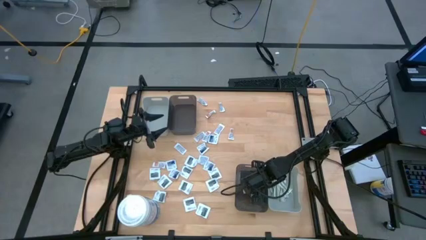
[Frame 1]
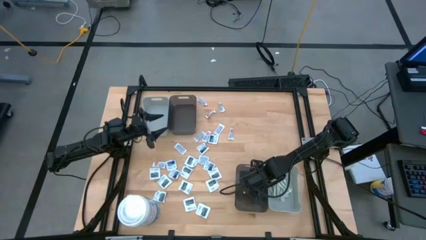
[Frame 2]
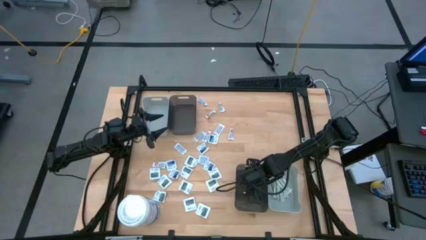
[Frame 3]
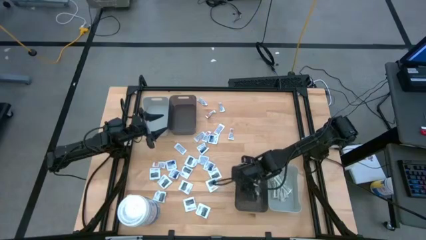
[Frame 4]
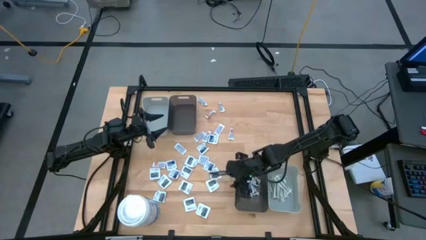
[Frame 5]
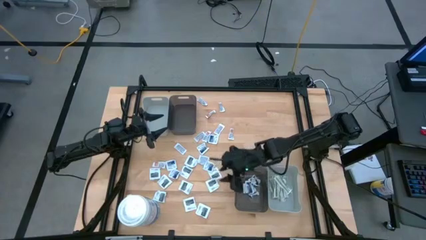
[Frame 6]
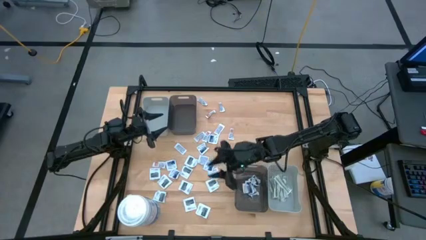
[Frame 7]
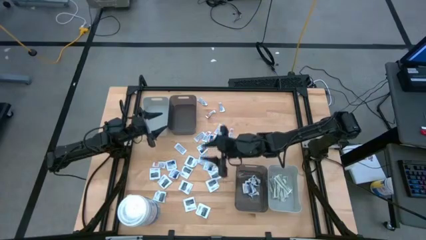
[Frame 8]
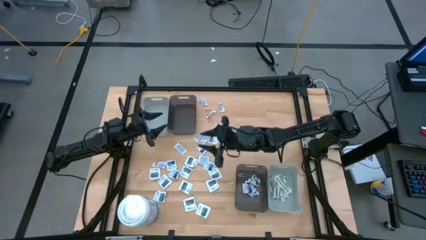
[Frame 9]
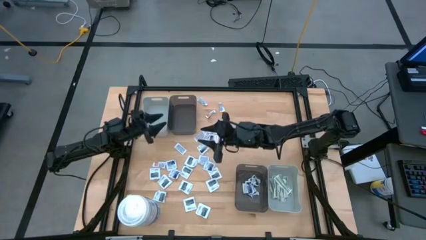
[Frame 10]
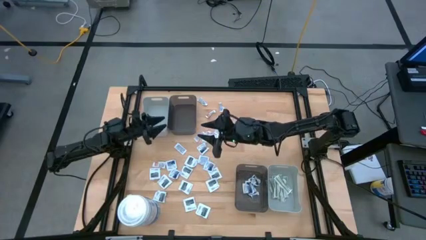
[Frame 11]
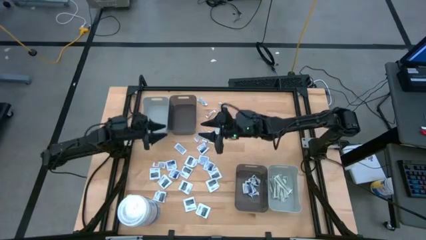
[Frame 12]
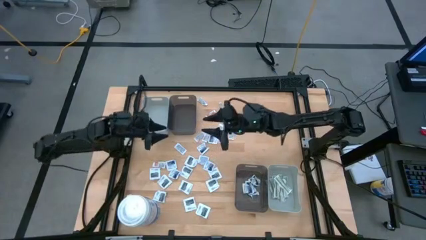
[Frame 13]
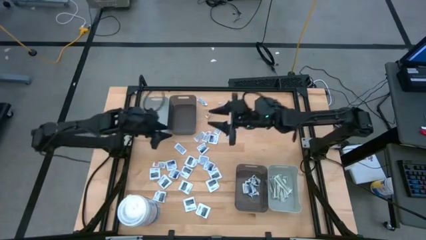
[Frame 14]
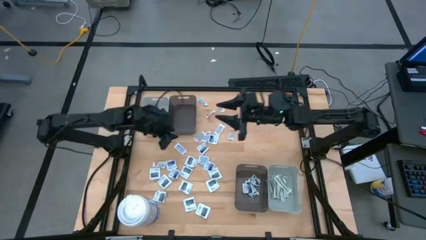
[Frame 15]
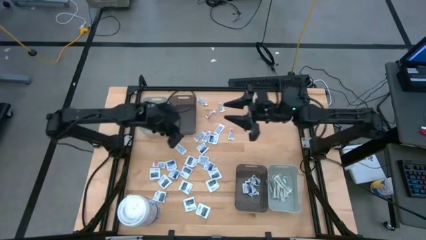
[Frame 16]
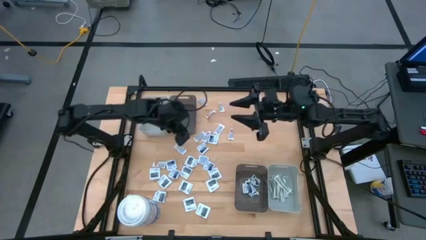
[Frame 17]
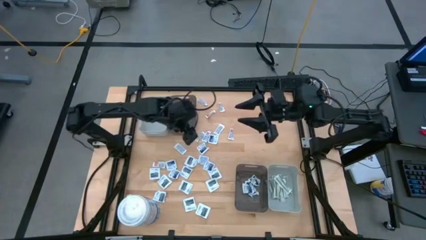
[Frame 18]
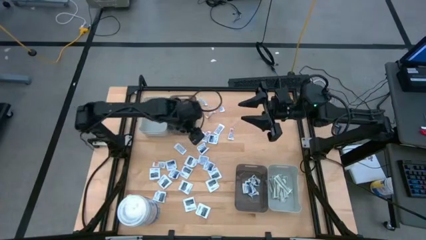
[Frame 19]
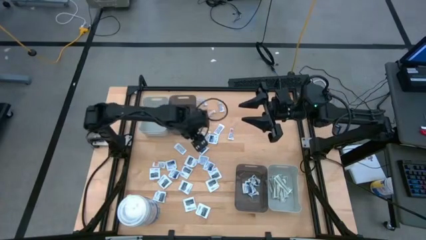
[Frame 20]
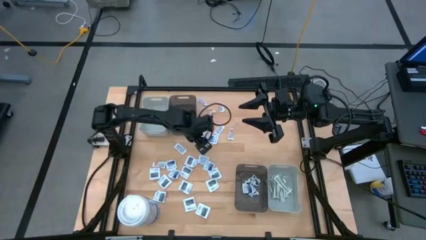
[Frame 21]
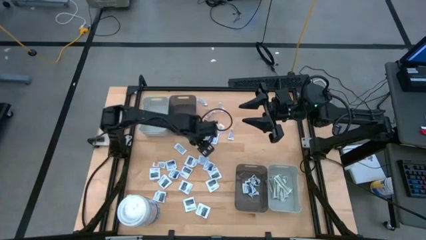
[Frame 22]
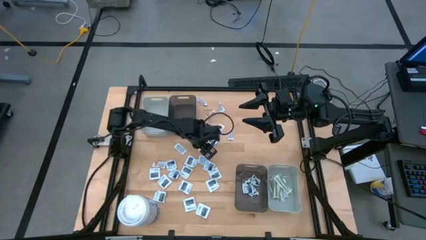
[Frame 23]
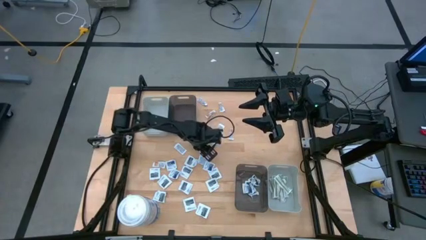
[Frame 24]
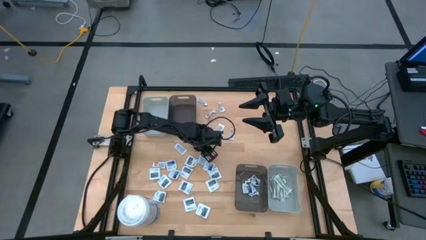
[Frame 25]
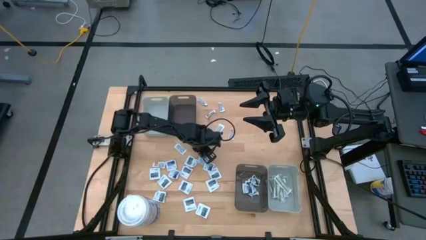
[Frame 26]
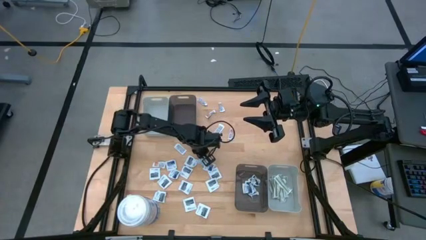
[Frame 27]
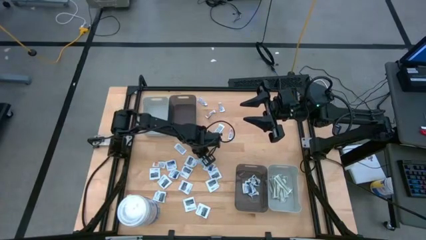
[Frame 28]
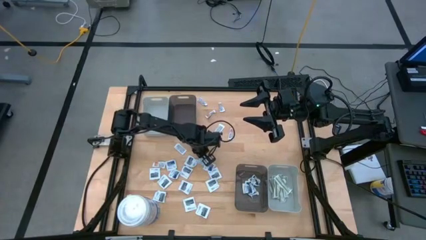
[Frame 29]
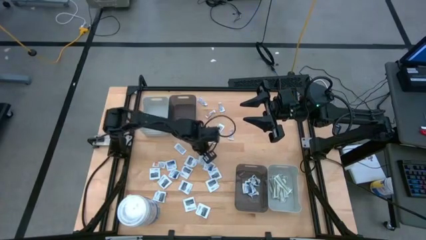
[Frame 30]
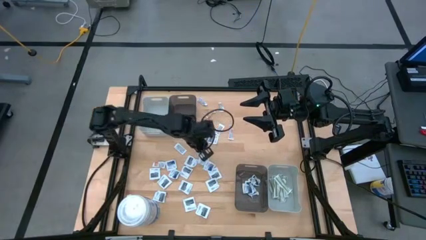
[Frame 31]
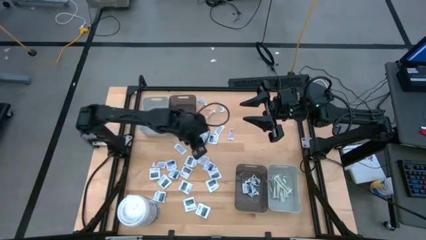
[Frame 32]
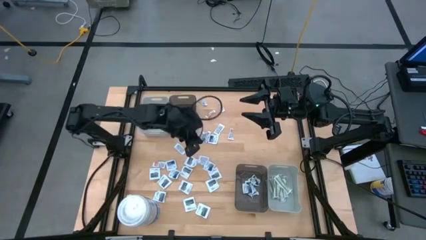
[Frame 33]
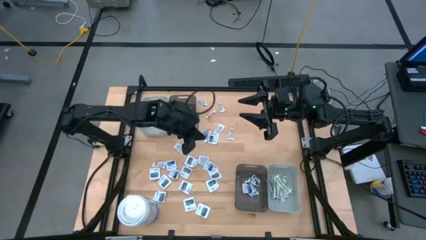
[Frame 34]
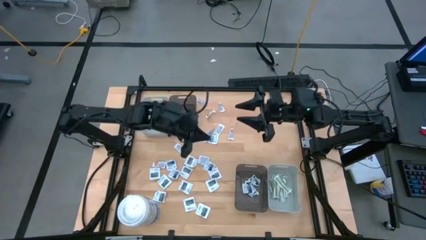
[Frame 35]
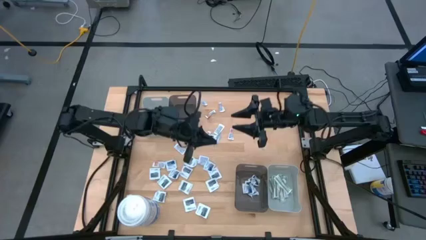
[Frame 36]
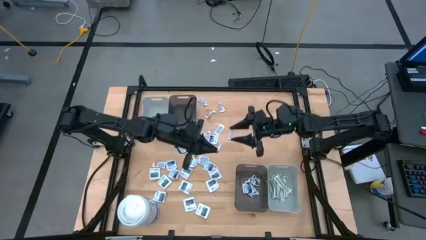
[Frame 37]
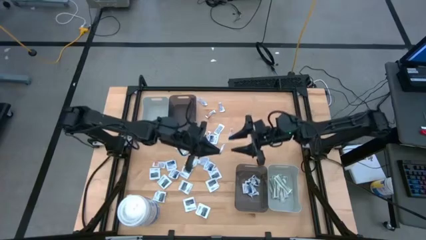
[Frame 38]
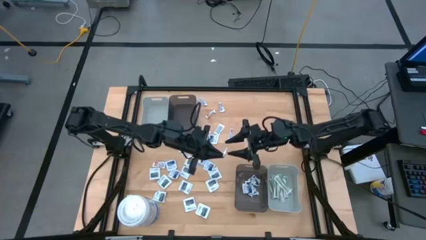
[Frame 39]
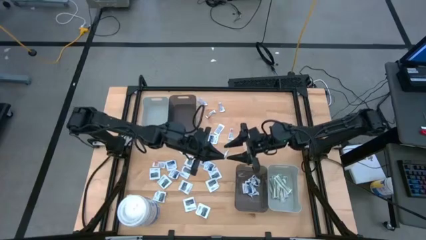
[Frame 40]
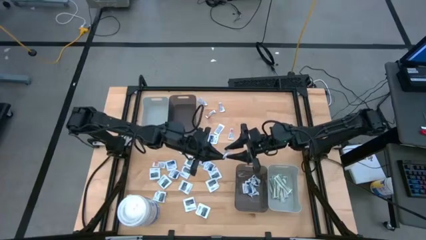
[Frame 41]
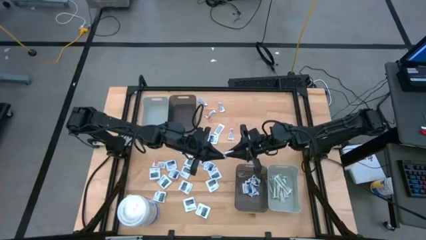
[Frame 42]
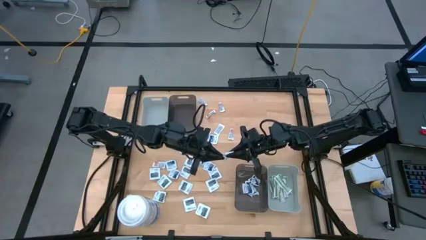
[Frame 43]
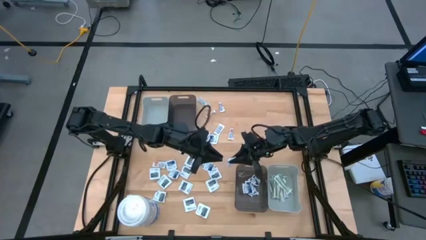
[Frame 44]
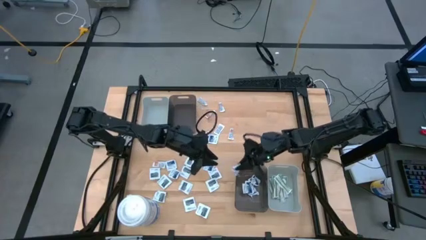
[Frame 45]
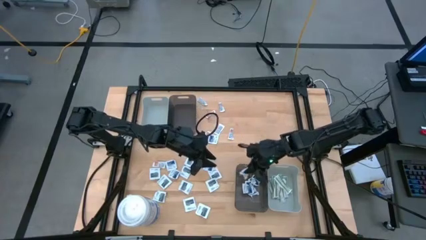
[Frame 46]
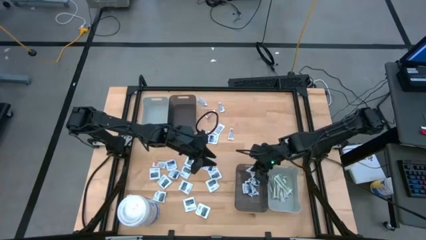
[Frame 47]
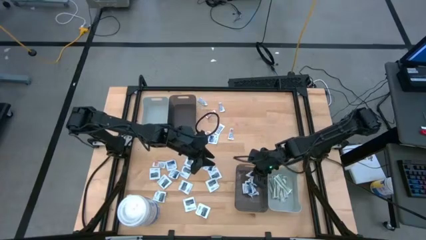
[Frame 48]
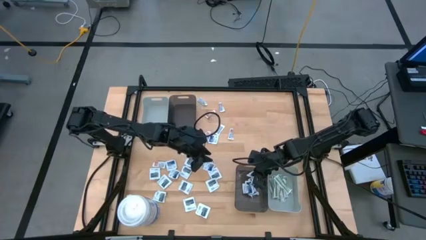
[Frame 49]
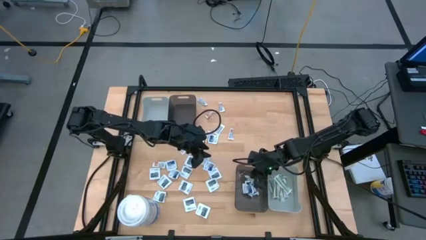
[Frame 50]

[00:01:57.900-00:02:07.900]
Task: Pick & Place First Aid Supplies
Put the white alcohol pad into the bottom black bin

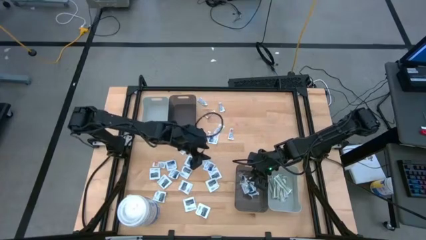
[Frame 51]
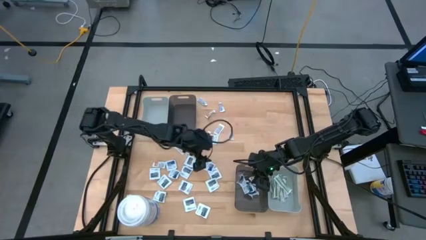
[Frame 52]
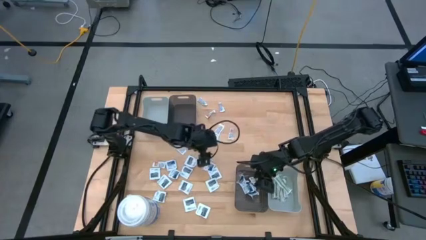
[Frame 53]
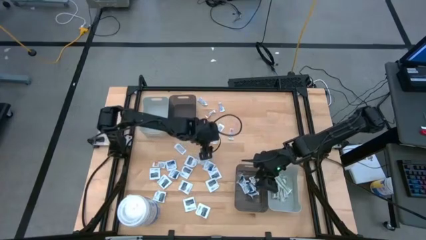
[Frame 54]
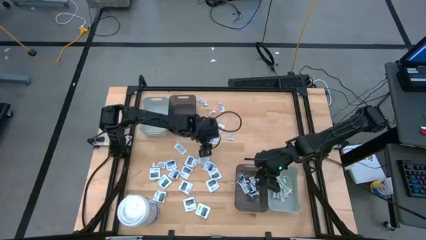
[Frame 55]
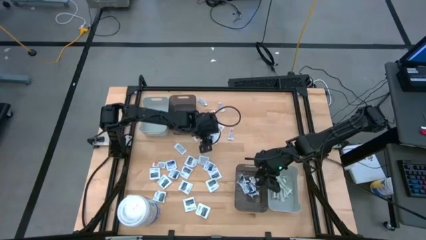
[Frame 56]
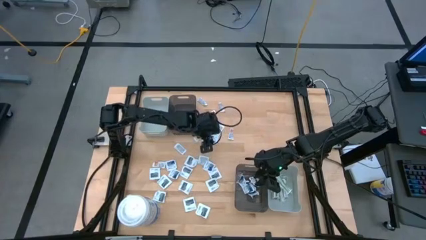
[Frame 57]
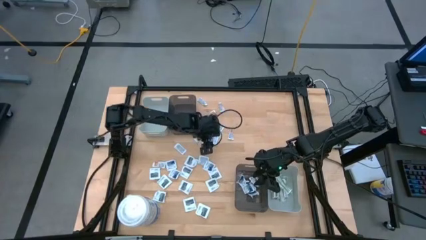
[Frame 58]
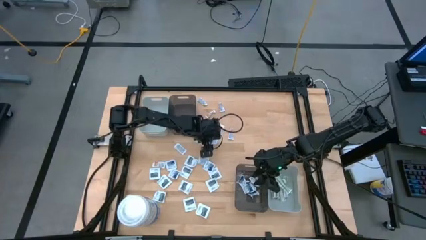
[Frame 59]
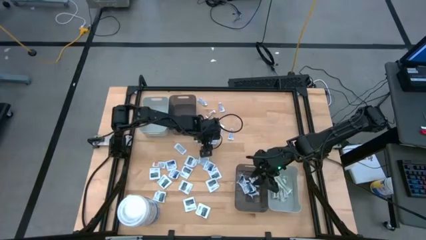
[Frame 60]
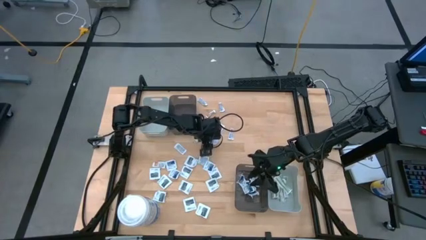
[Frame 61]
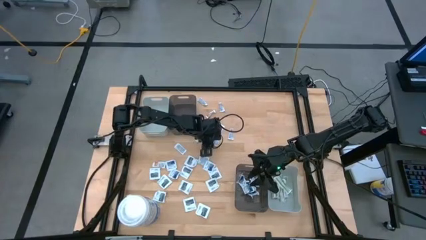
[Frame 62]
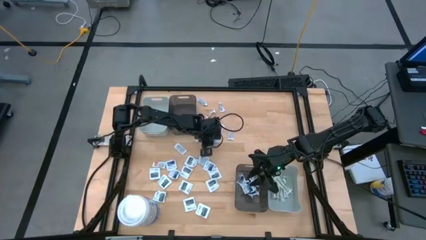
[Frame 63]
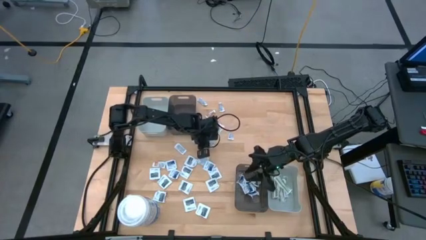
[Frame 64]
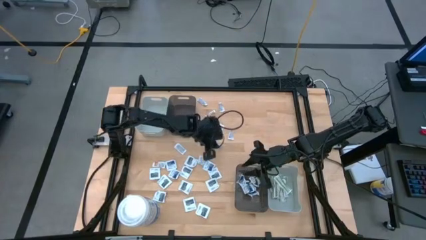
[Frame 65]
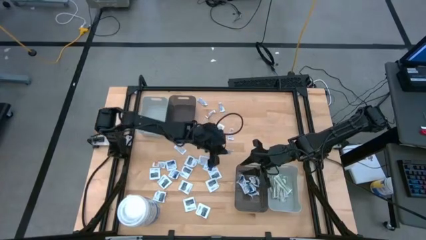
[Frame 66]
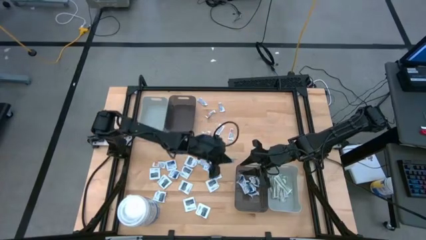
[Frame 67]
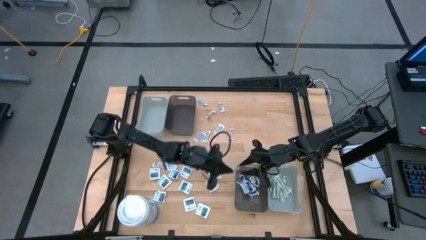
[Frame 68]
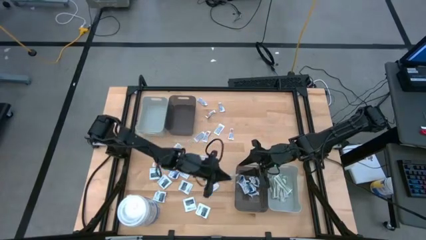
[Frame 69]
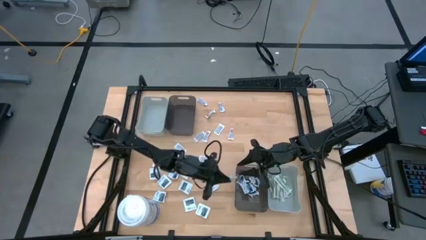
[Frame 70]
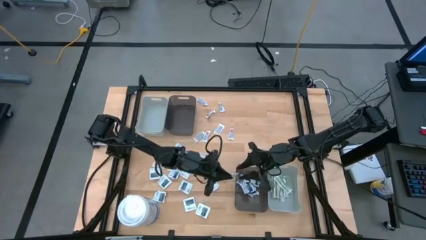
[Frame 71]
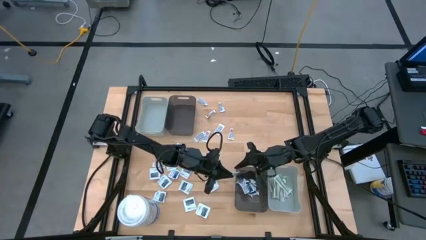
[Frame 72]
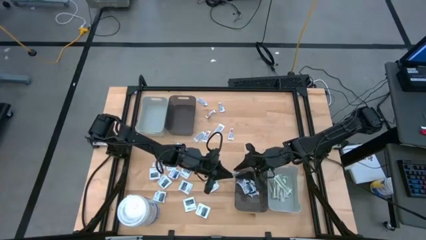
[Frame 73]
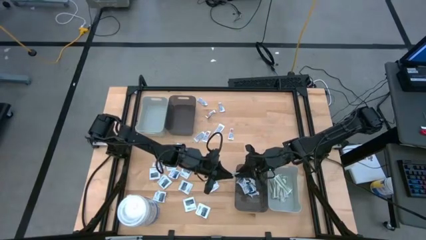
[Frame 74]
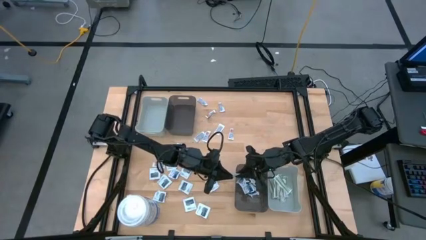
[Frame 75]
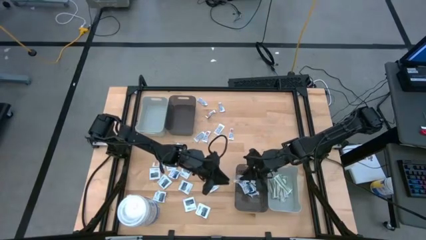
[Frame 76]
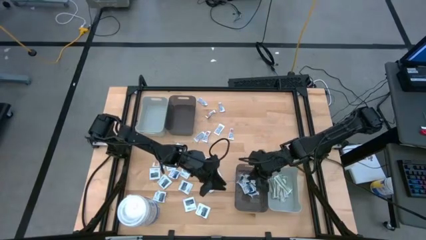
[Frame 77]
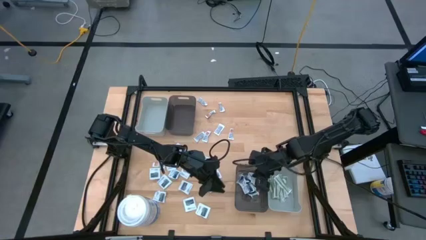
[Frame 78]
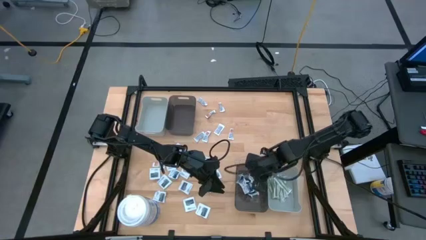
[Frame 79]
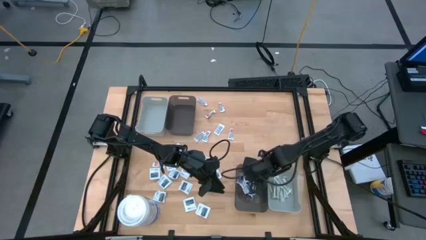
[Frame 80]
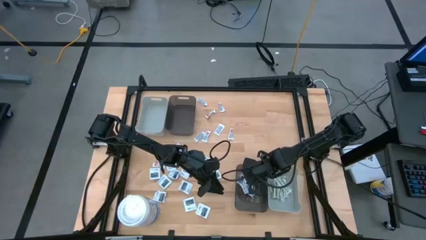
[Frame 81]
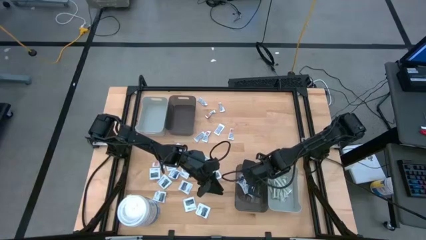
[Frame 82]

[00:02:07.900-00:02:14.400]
Put the white alcohol pad into the bottom black bin
